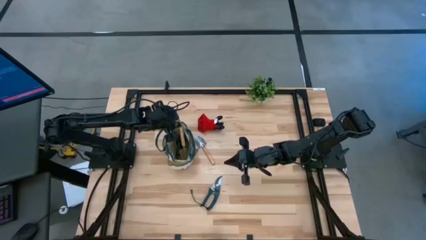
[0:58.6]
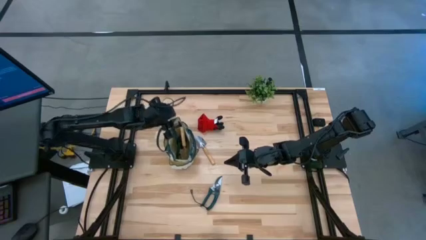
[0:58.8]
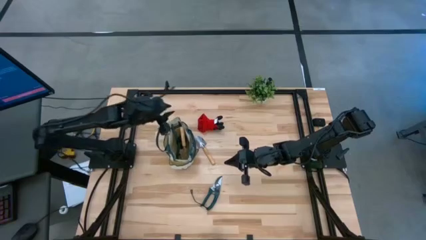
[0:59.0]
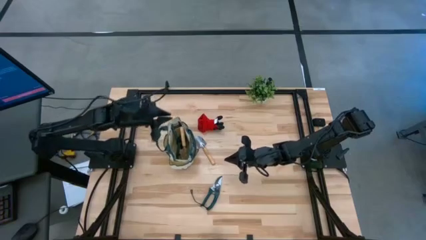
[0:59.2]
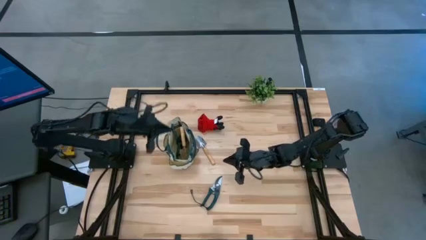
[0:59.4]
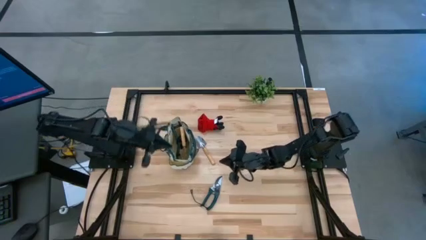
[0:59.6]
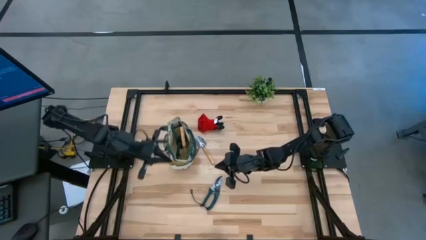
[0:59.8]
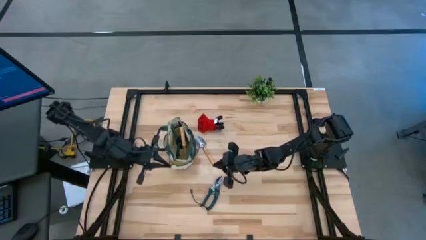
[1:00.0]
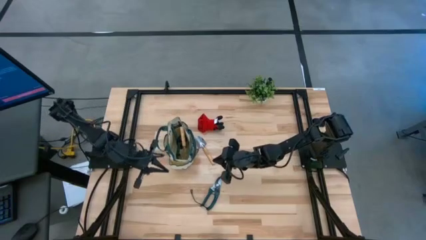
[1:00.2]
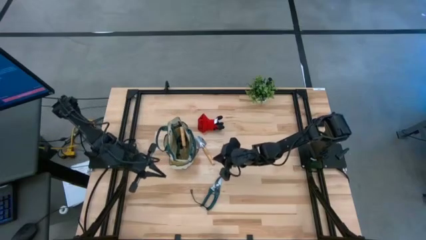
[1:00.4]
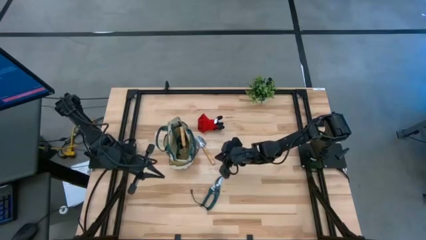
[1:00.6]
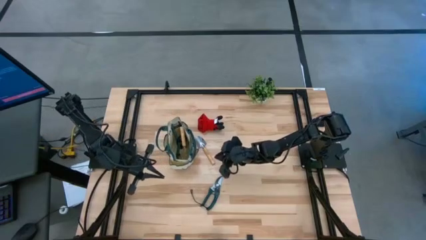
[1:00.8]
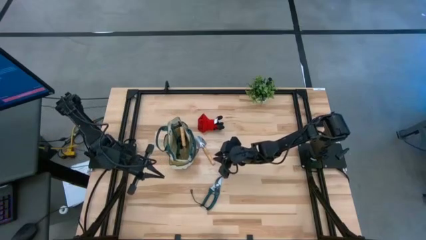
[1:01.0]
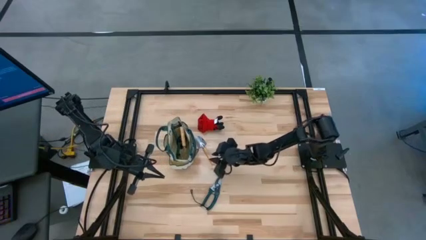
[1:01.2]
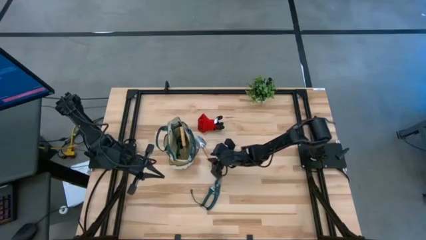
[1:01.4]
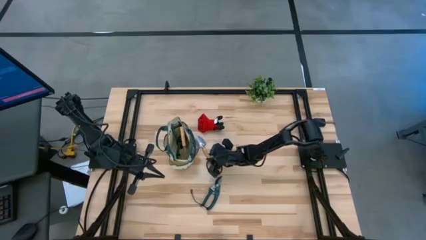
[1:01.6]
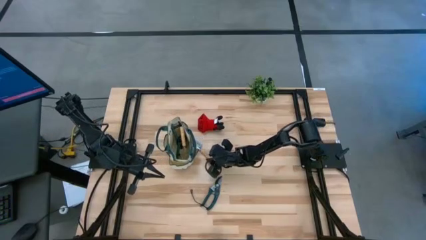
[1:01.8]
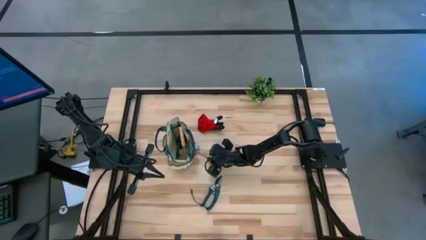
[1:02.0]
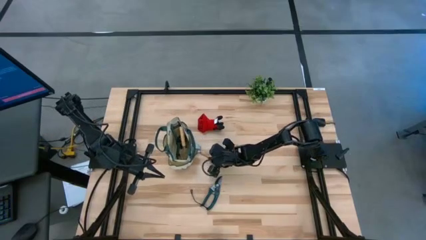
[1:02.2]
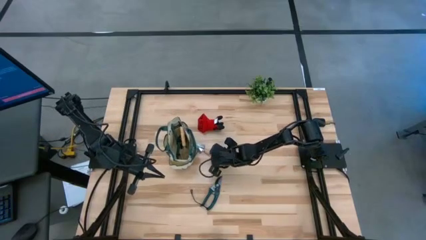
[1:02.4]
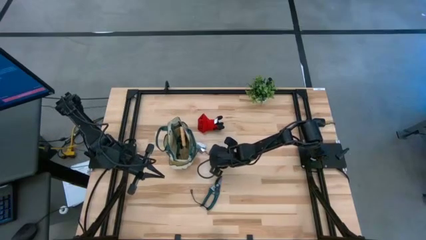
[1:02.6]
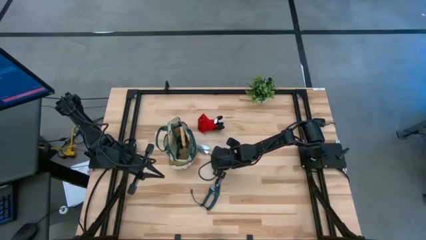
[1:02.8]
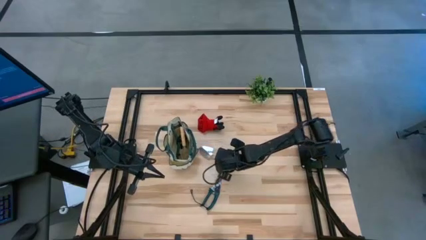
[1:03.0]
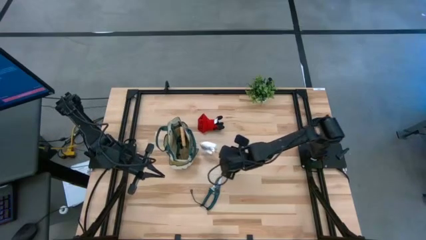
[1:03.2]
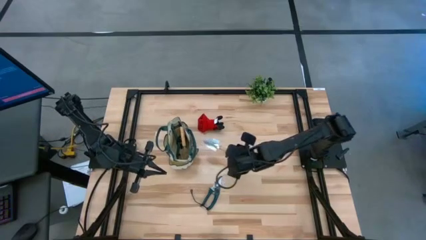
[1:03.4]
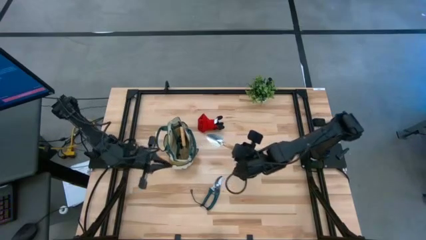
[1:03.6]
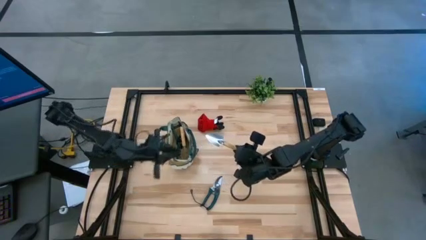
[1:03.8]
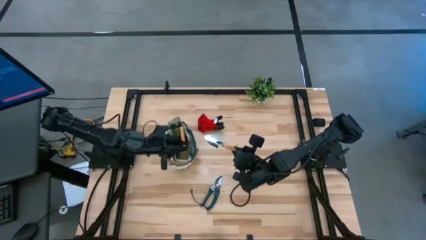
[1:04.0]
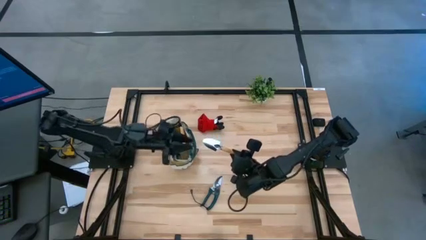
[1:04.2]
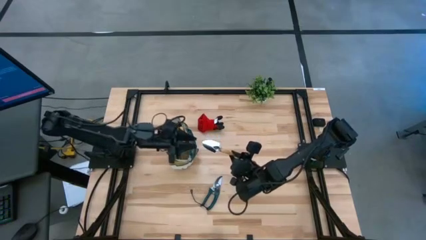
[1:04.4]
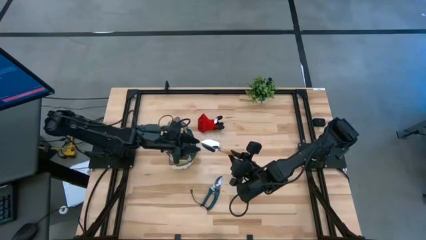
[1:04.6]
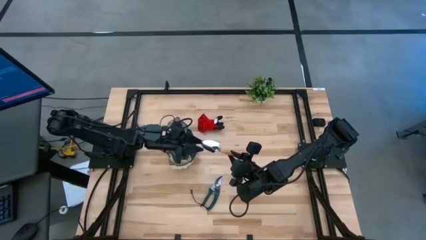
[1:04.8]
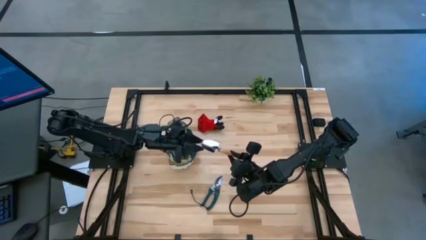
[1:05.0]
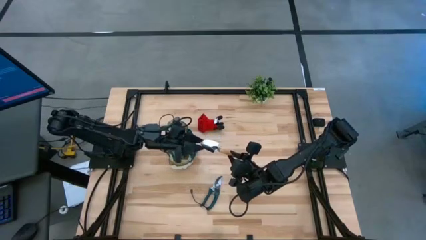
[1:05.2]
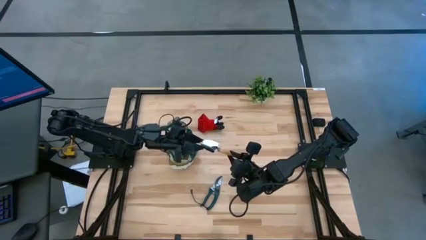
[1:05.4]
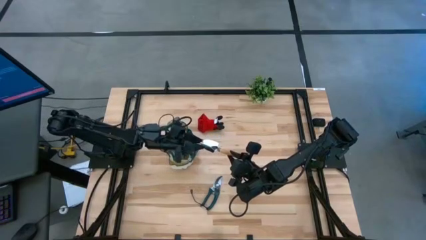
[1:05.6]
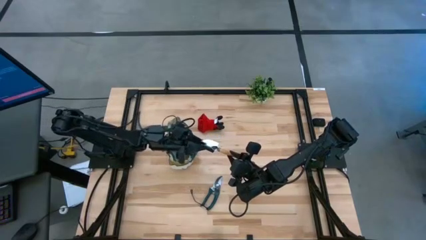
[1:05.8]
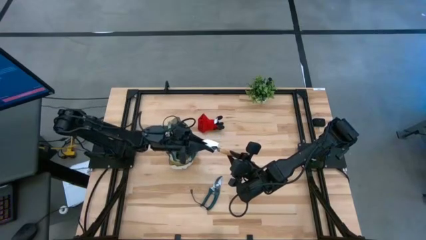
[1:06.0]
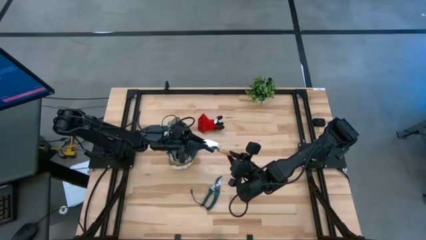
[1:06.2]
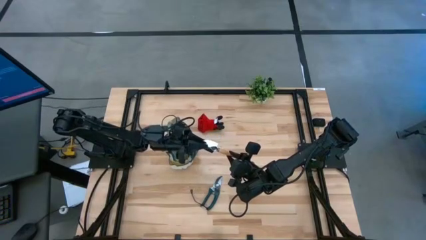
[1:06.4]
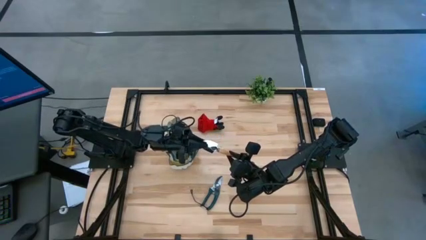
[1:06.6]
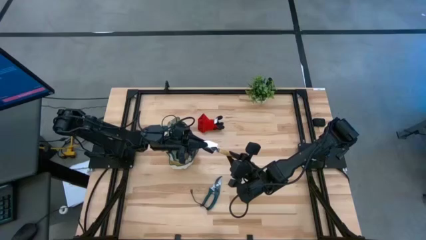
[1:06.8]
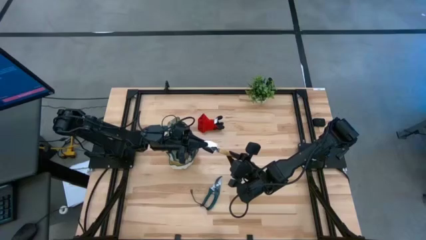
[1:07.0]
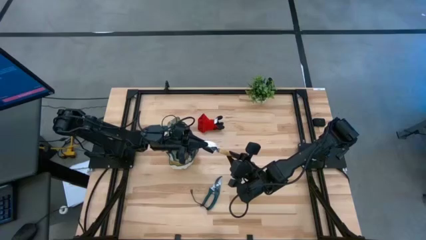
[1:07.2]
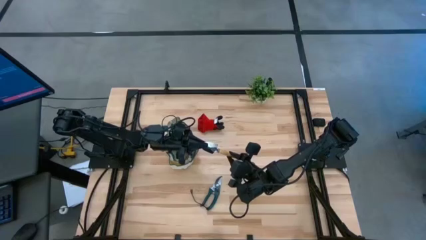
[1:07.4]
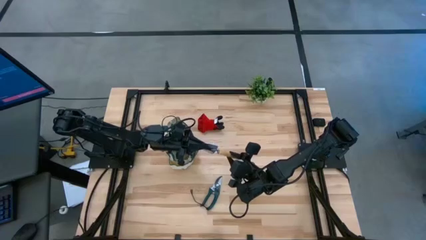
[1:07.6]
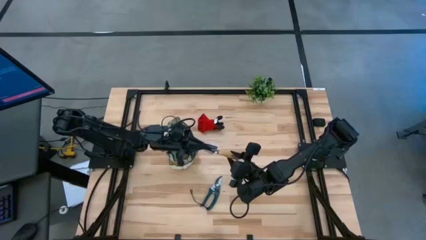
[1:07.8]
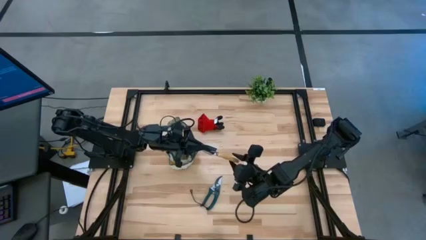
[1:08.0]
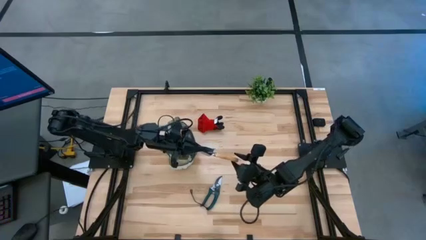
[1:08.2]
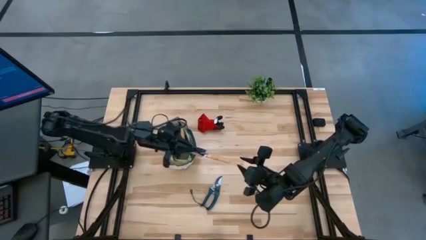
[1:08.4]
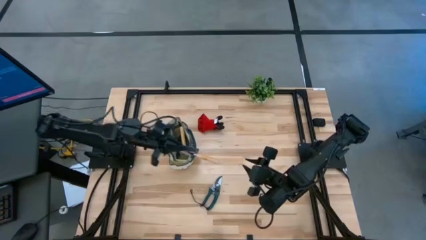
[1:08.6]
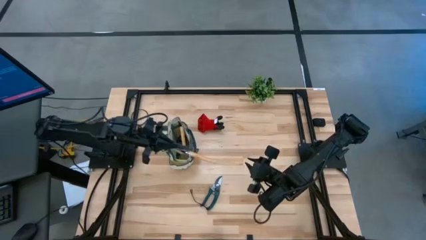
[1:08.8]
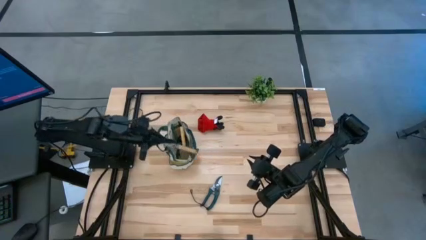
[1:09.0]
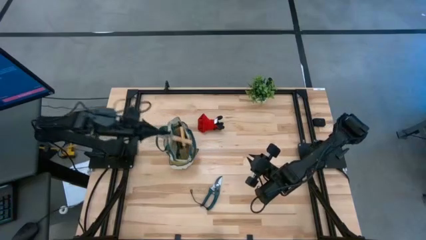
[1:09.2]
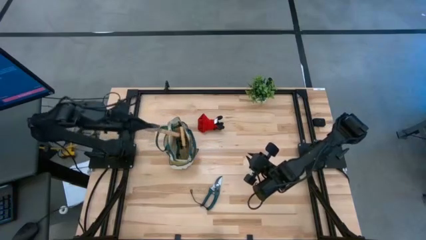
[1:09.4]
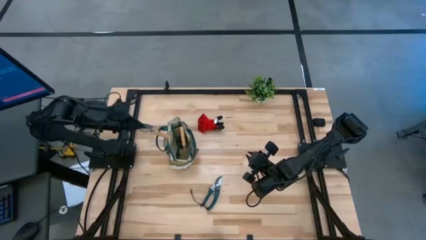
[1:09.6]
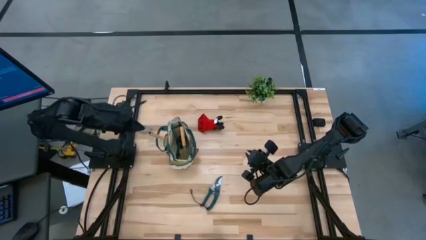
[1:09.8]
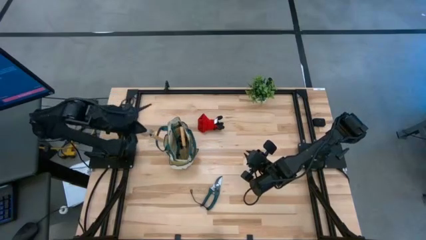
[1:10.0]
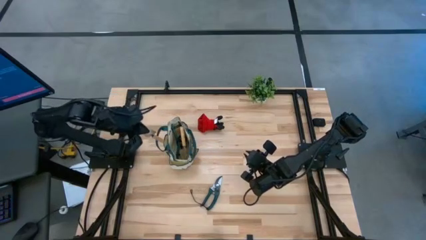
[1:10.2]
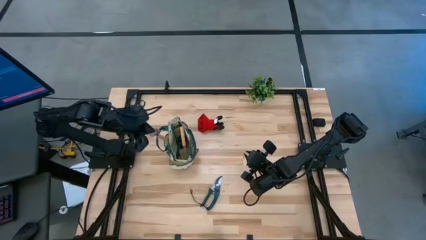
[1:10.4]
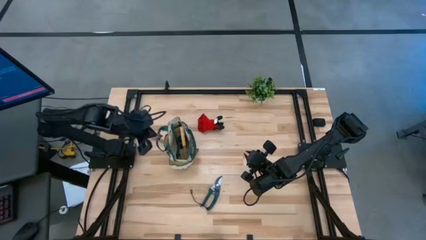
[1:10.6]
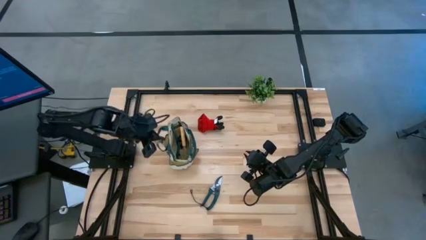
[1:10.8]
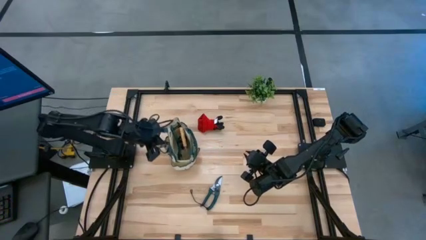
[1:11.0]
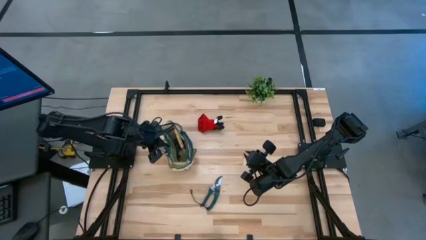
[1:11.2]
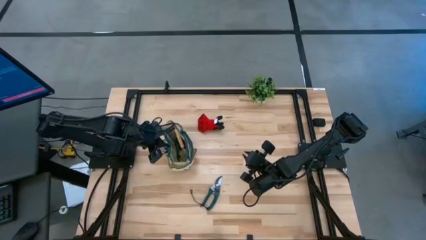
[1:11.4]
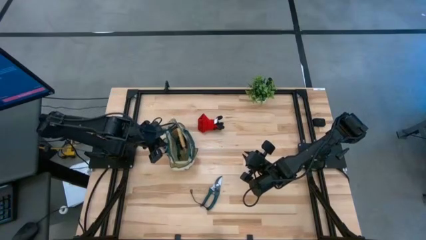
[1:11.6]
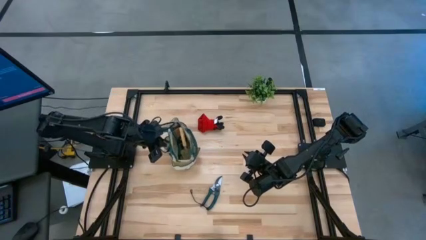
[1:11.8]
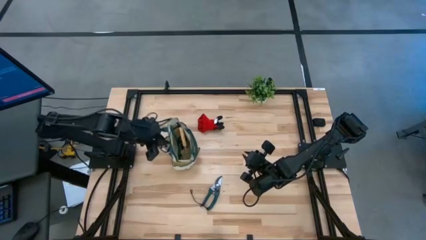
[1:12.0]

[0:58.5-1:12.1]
Task: Pick & Place Garden tools in Gardening bag
Put the brown trowel into the green gardening bag

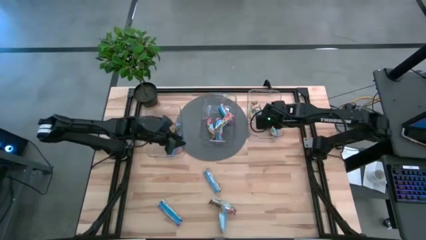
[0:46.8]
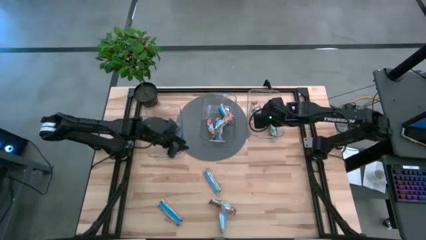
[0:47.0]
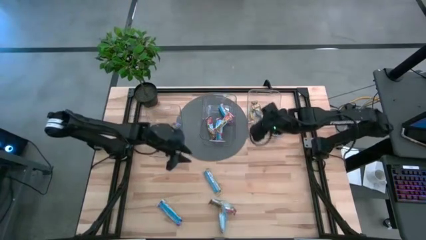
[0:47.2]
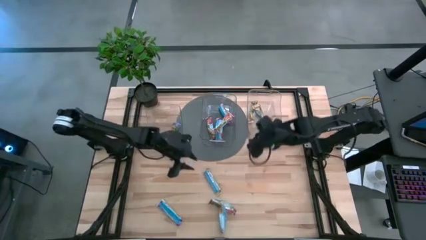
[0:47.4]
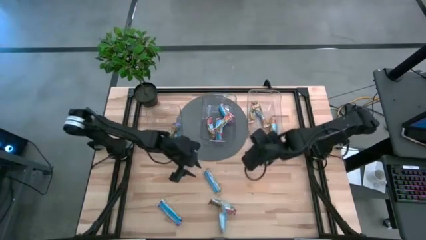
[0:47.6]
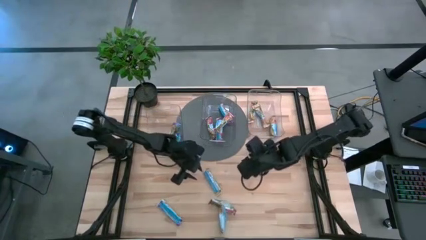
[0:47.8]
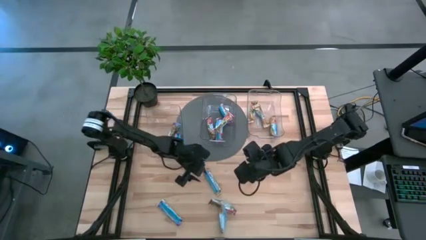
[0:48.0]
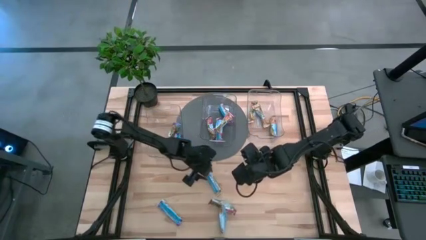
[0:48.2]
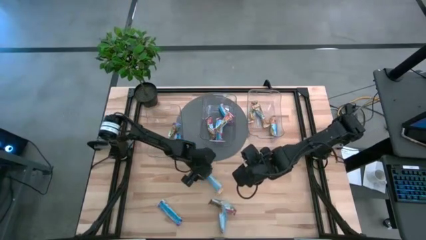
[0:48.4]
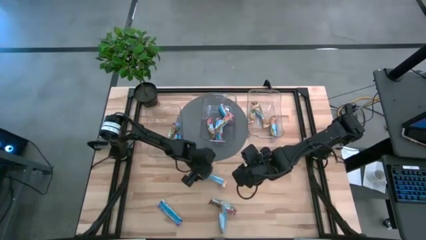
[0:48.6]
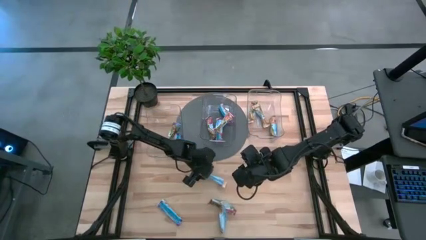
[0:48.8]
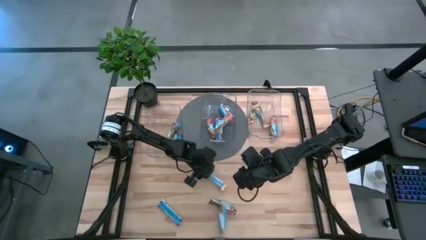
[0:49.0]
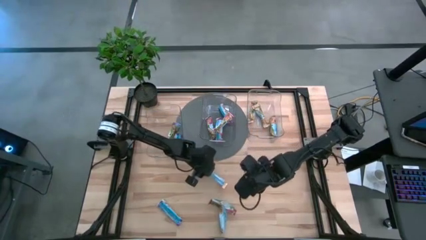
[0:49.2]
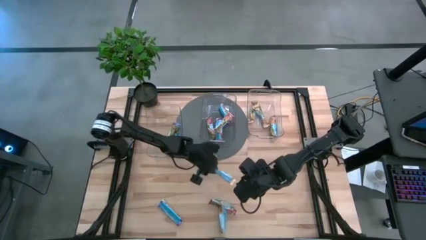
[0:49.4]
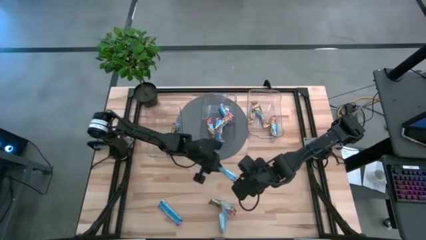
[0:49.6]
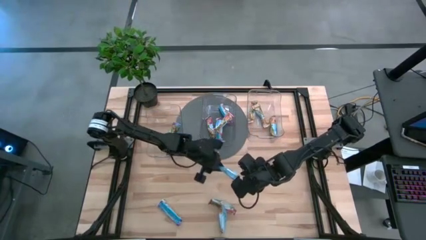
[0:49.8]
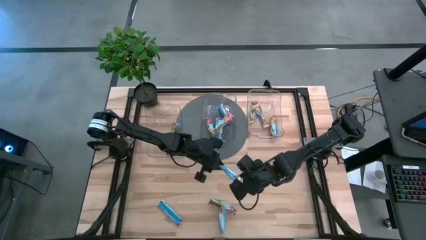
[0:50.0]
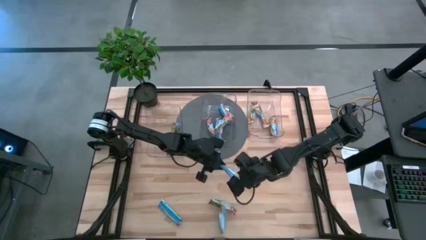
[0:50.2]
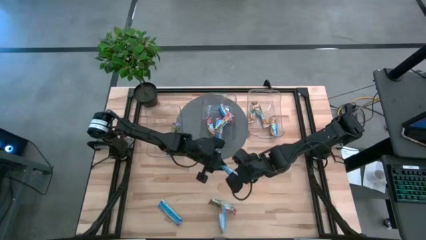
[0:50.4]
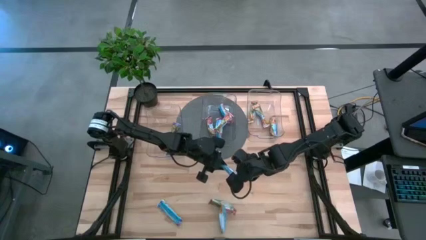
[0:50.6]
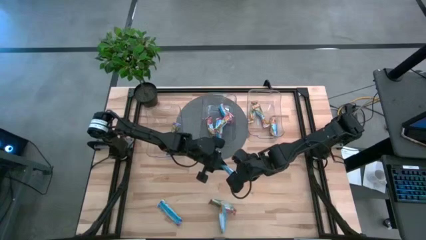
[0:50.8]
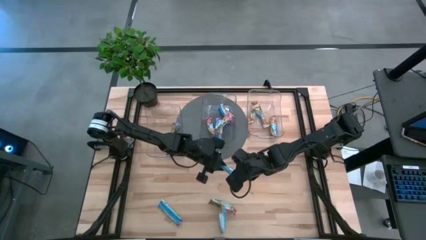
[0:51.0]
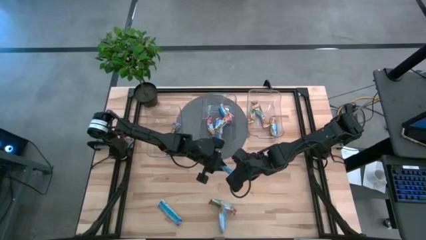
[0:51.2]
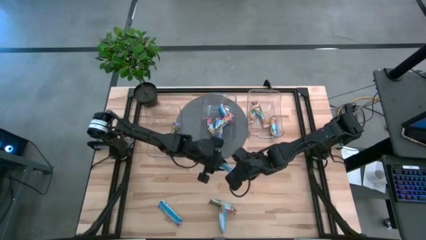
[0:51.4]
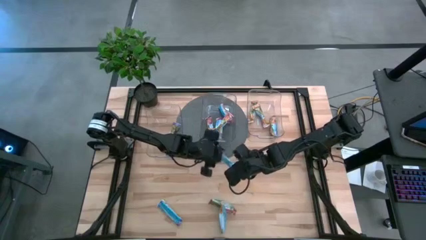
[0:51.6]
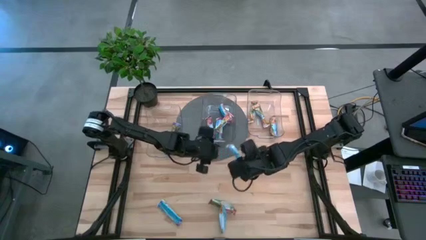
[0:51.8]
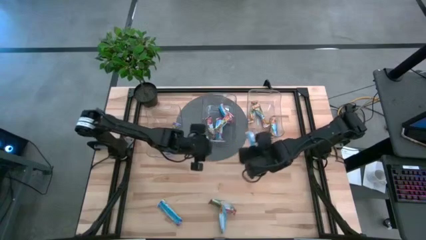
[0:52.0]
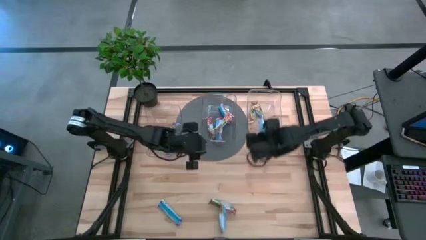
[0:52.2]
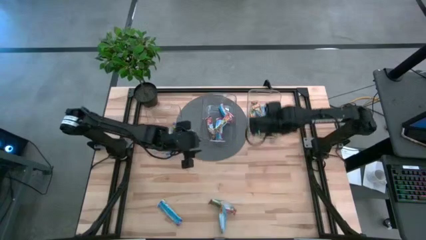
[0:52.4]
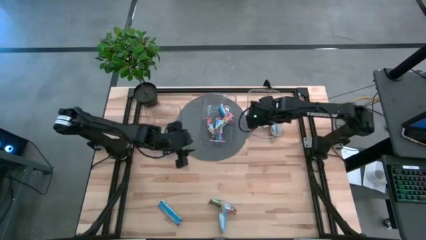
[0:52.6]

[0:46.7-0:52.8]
Task: Pick and place Granola Bars by type
Put the orange granola bar into the right transparent bin
